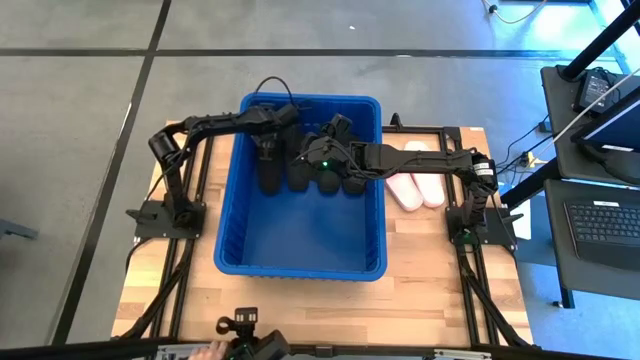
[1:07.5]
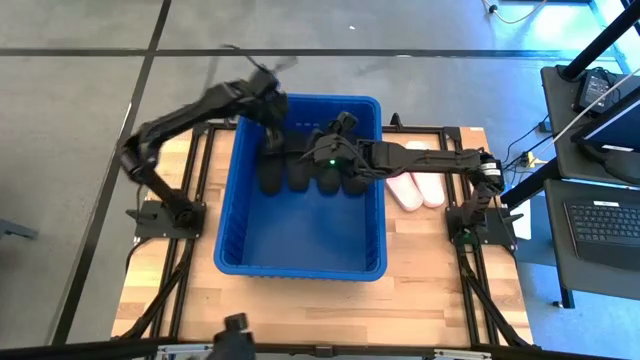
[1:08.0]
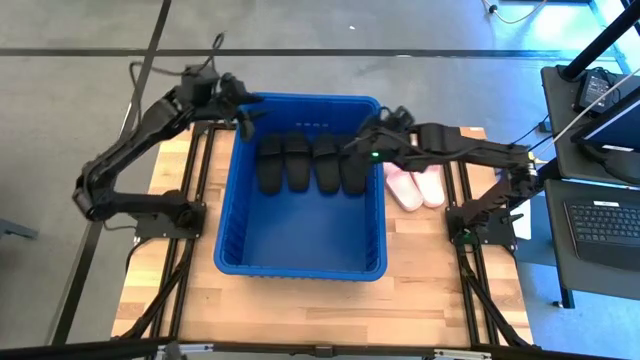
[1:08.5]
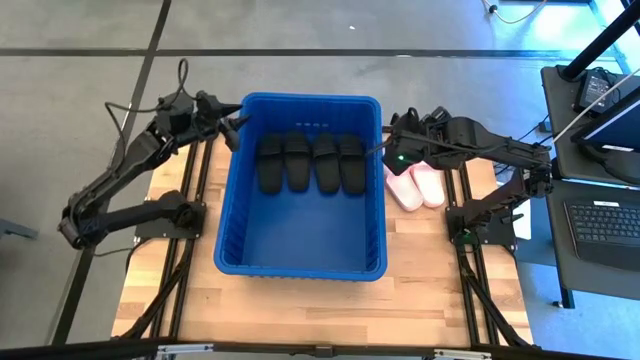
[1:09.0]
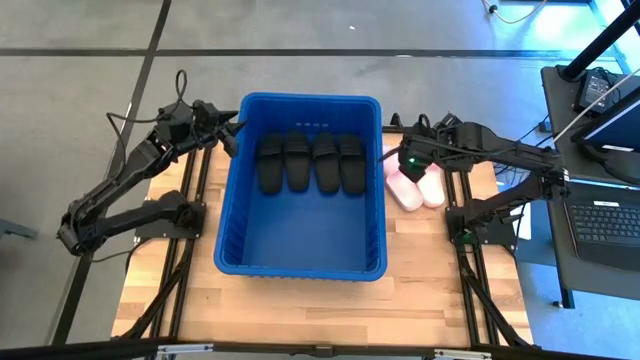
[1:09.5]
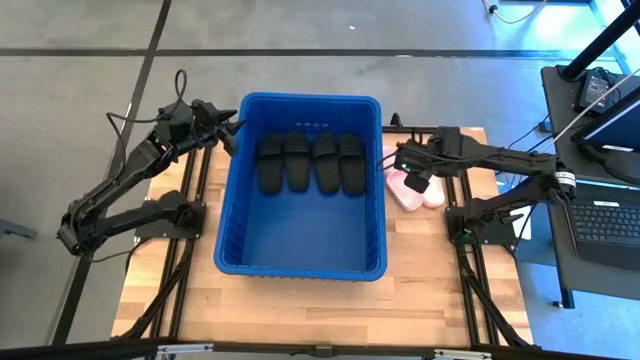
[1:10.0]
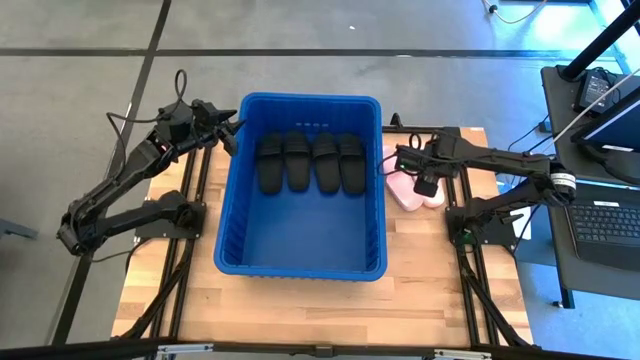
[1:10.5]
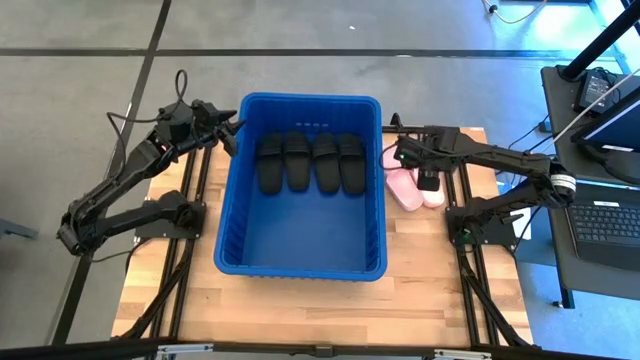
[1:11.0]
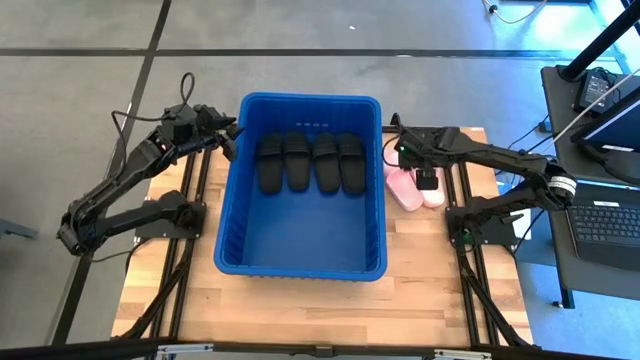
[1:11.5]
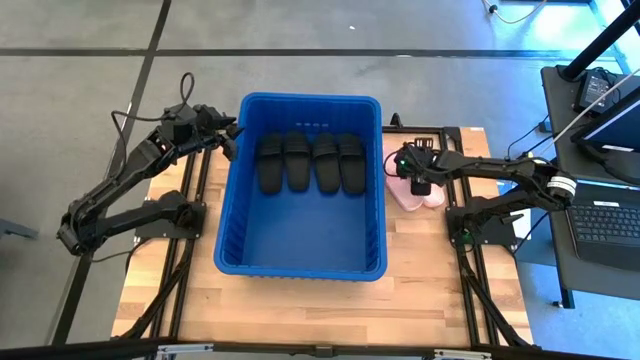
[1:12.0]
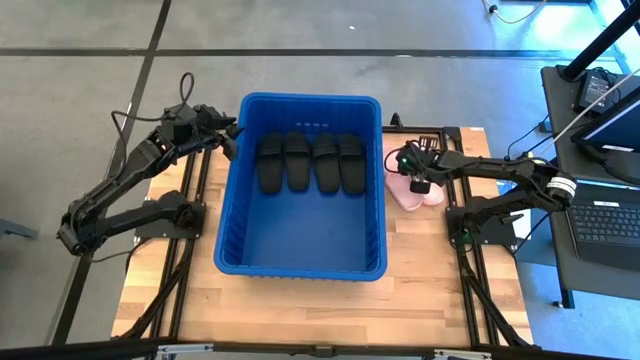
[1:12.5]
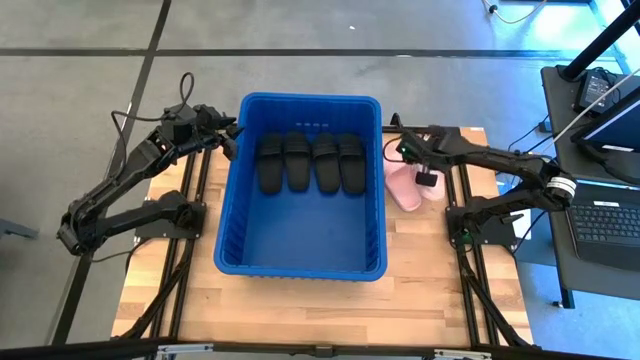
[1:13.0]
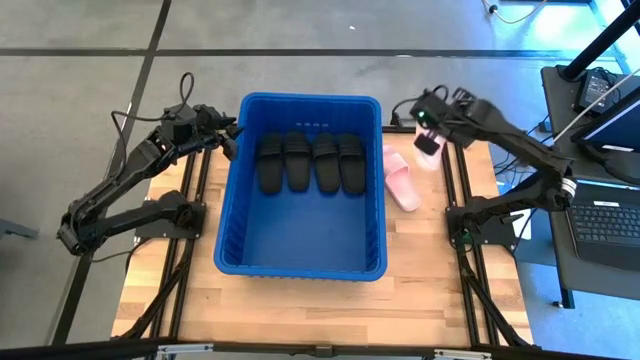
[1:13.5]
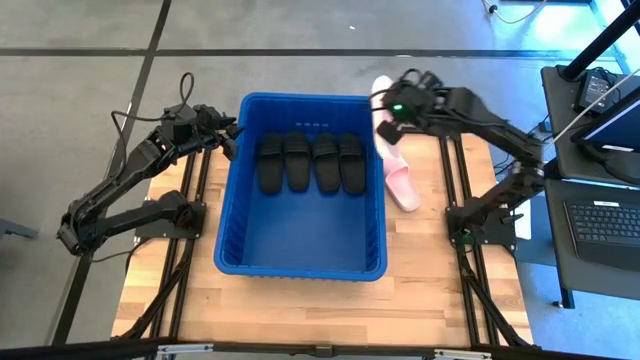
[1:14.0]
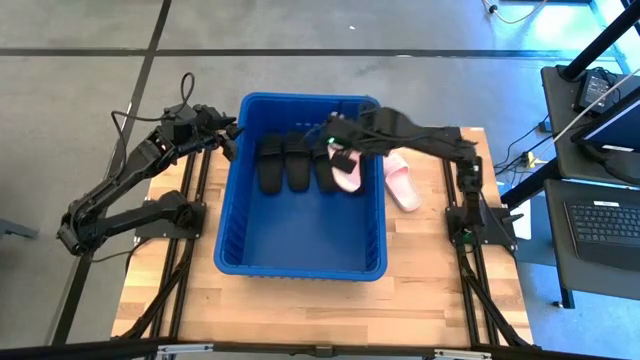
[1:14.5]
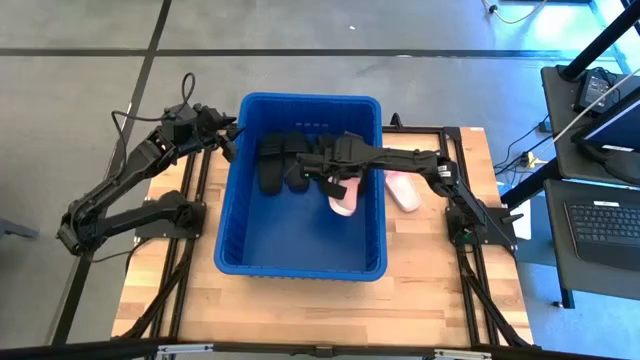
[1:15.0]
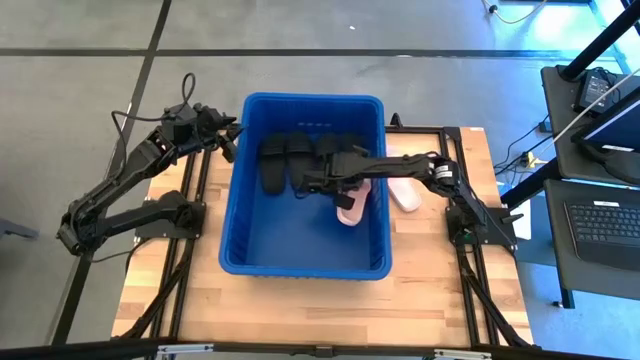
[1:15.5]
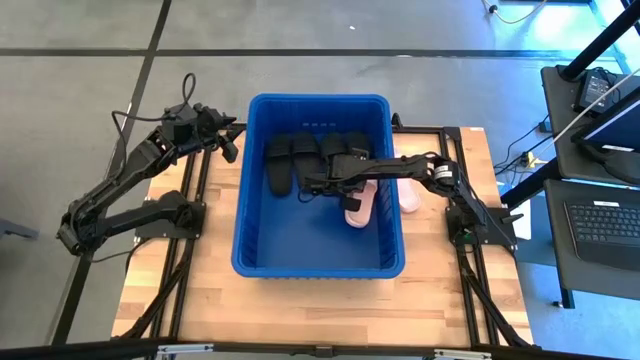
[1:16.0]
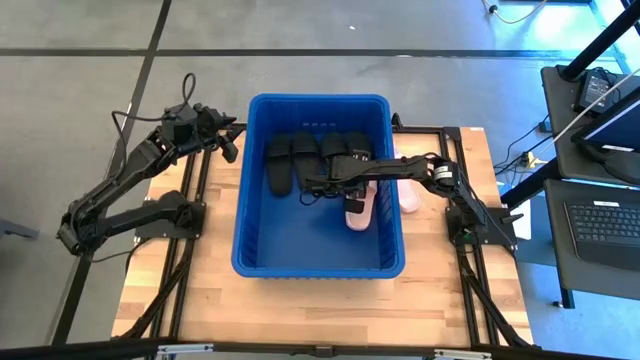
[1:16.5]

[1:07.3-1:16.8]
Task: Pick and place slides into bin
Put the pink slipper into the blue bin

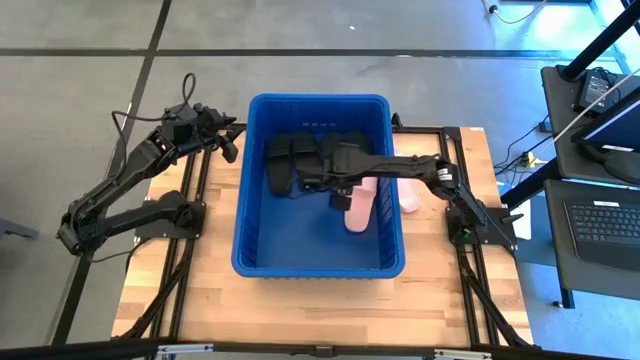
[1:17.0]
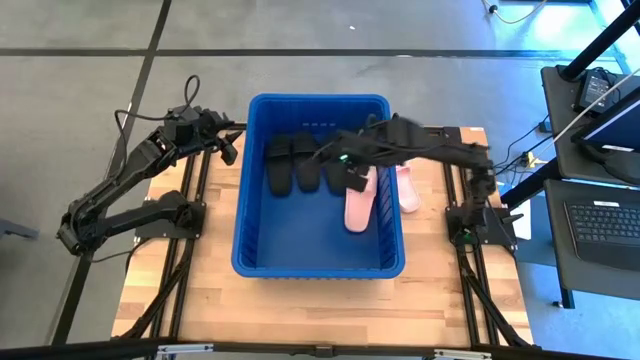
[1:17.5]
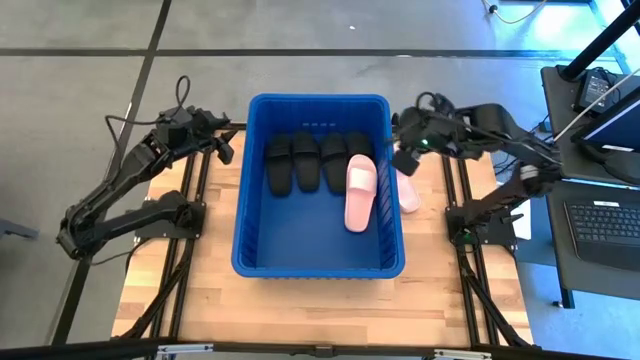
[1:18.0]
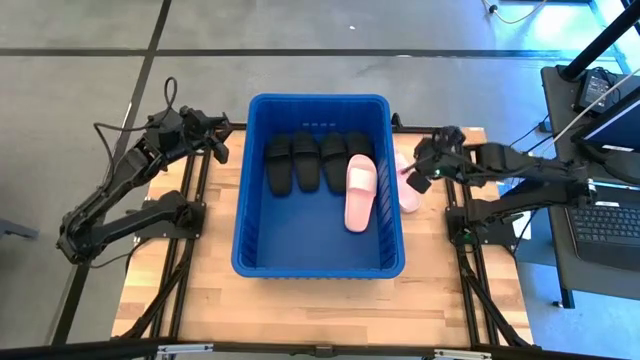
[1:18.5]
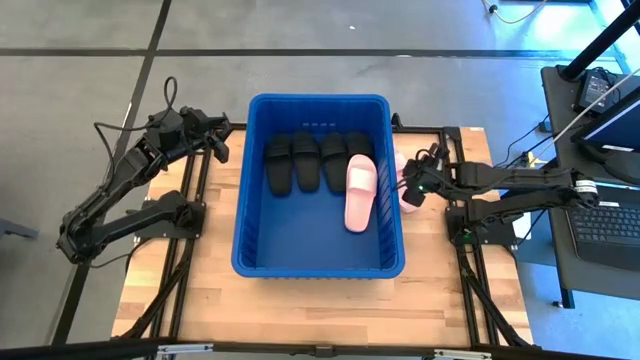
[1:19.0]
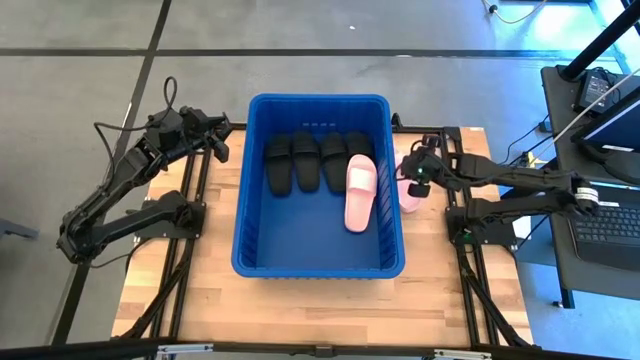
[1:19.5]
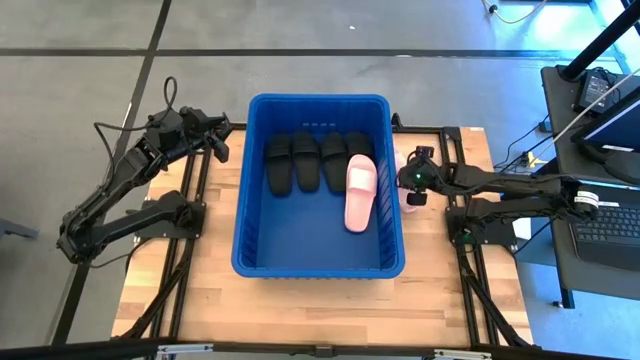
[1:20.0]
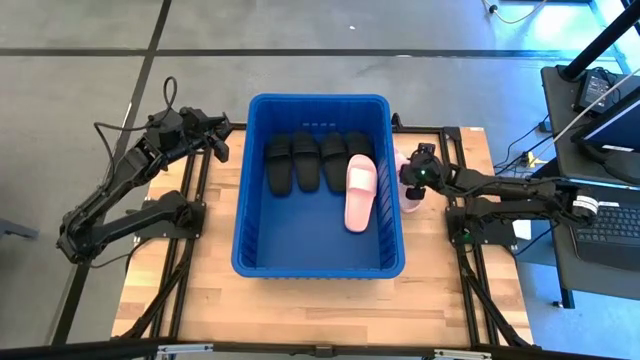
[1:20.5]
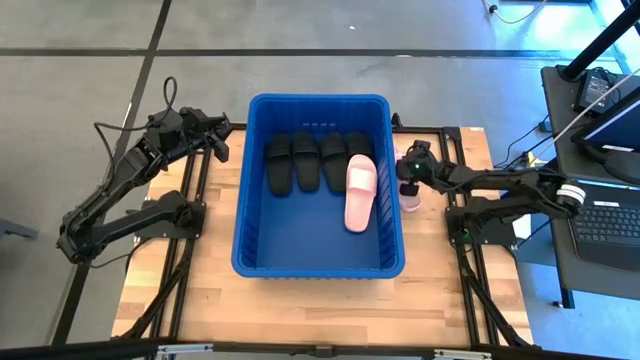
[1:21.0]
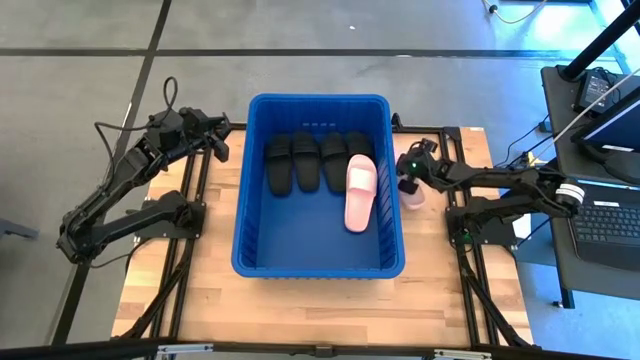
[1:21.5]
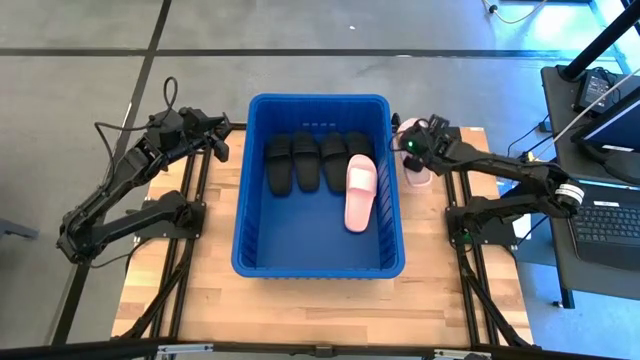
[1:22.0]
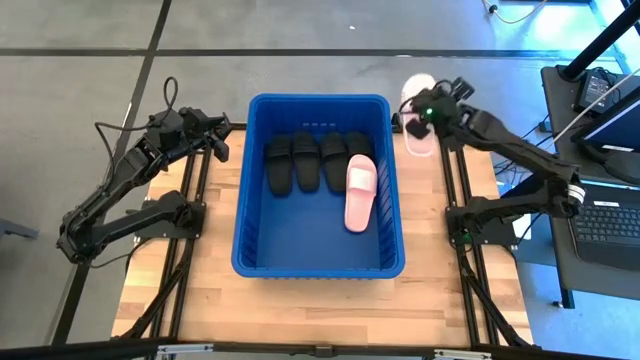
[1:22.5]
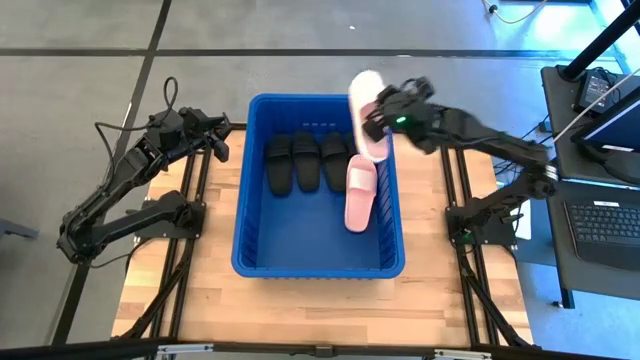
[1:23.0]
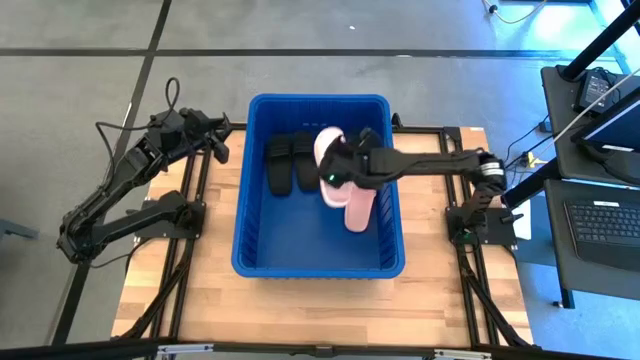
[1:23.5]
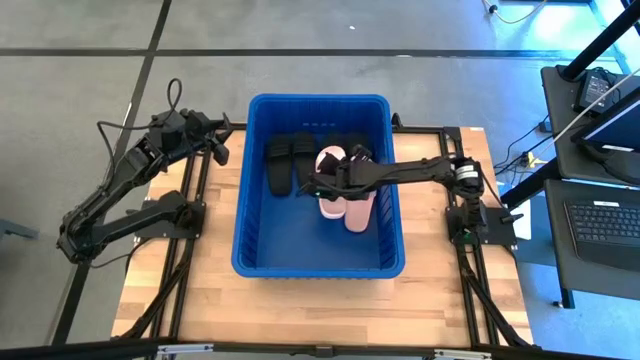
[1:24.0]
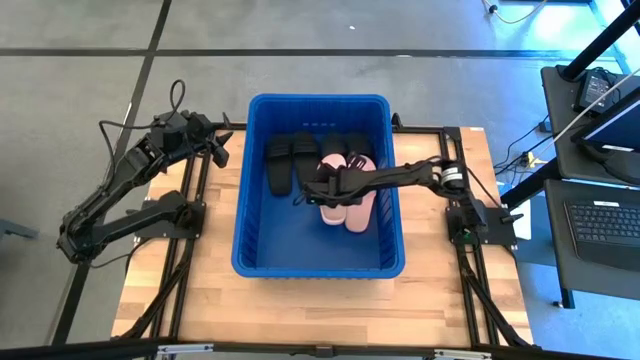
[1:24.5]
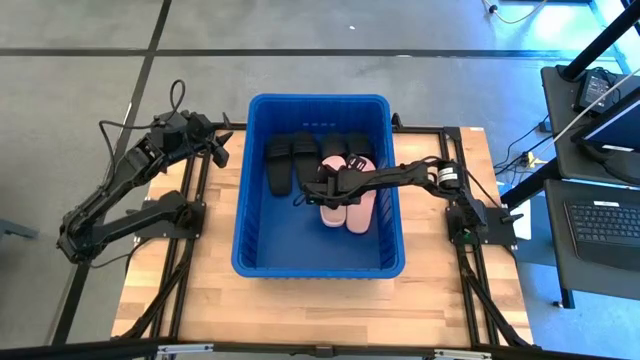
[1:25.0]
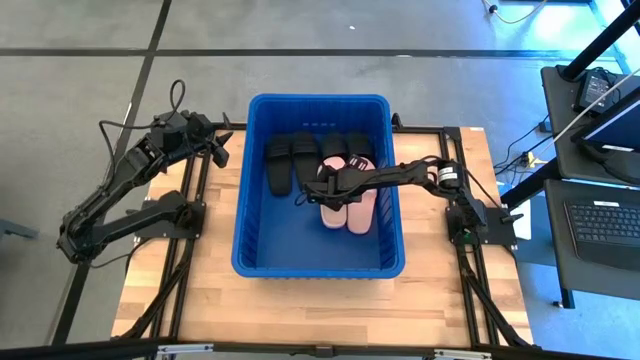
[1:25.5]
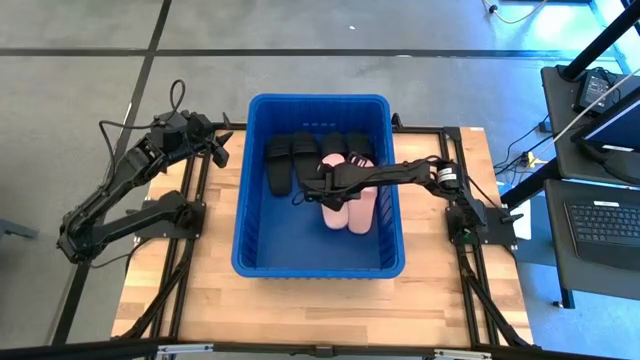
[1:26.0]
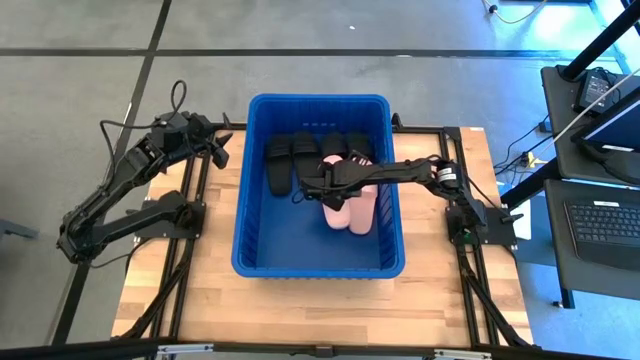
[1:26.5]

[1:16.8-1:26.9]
Put the pink slipper into the blue bin

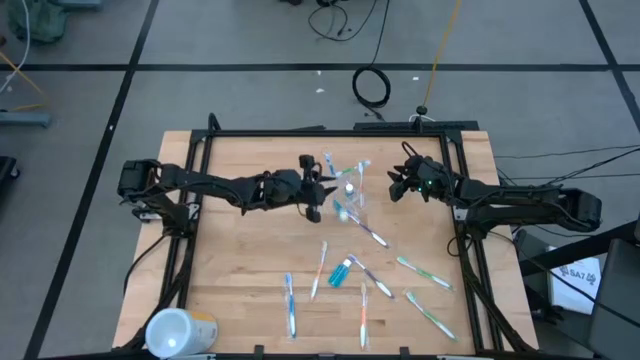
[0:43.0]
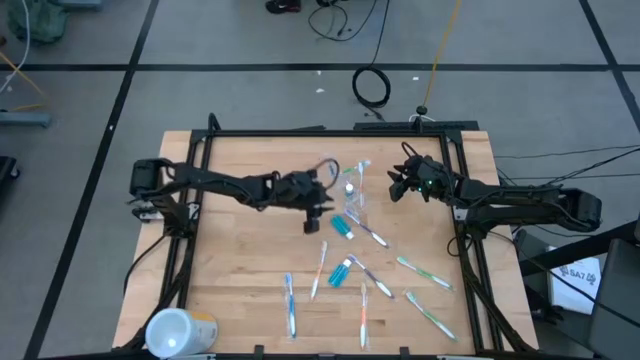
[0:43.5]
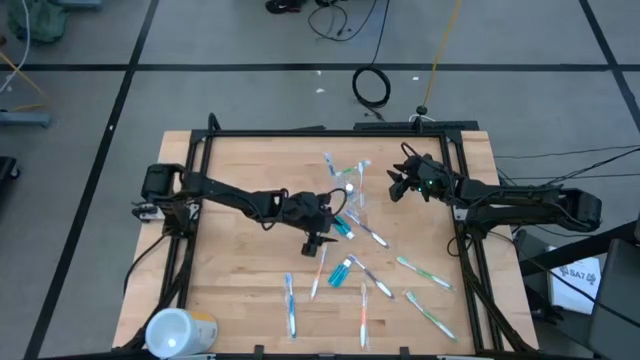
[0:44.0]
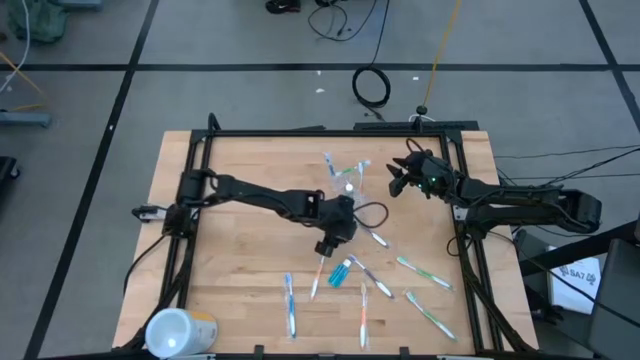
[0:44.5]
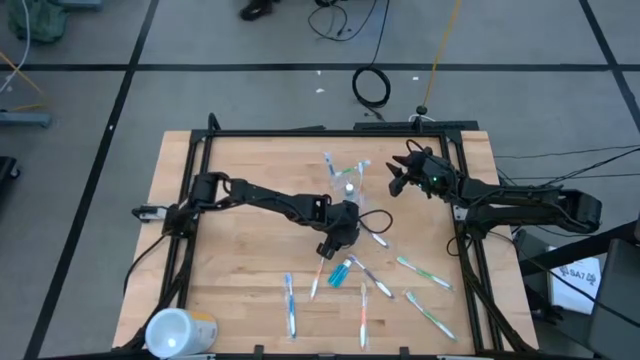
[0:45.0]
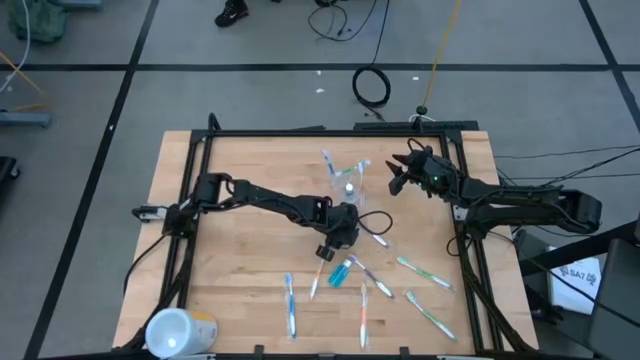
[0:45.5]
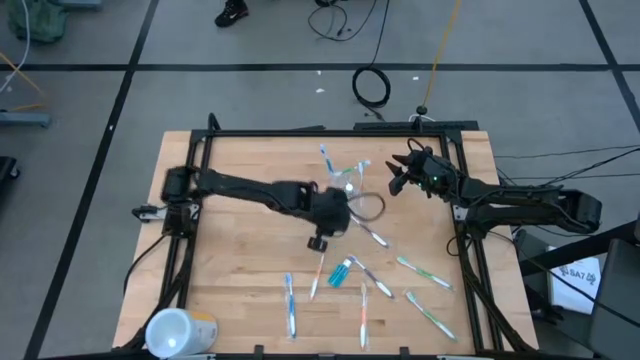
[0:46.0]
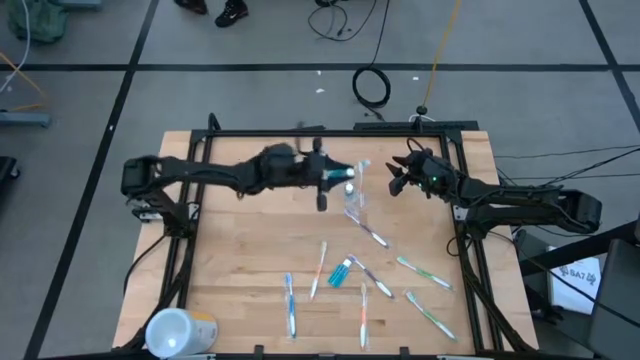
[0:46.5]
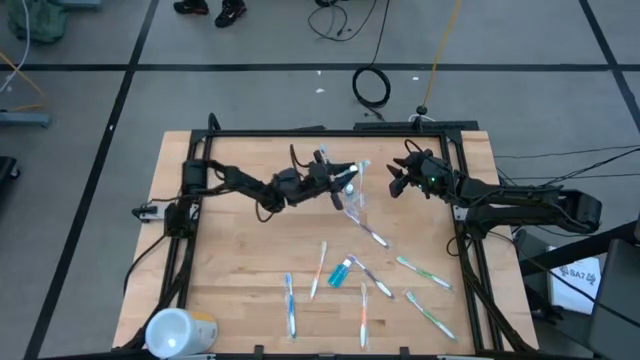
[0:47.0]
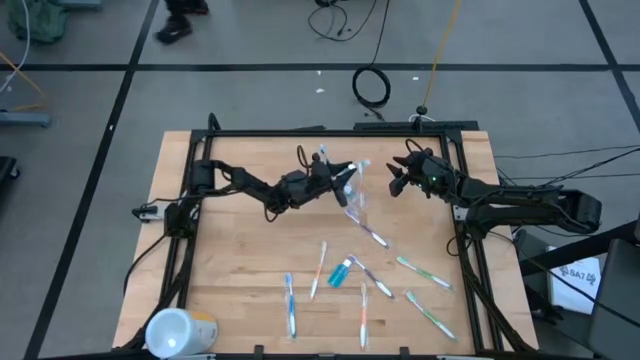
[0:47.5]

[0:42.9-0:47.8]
Task: Pick & Place toothbrushing station
Put the left blue mouthwash into the transparent organizer
